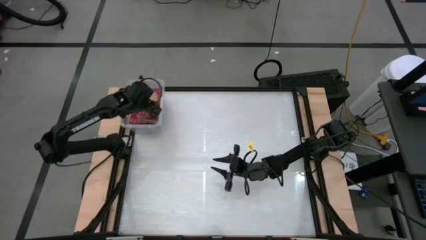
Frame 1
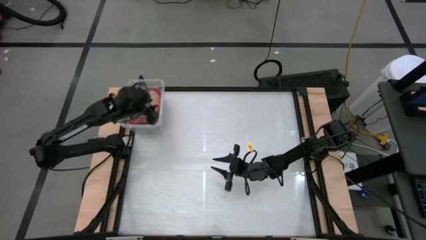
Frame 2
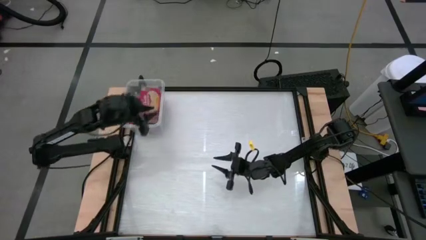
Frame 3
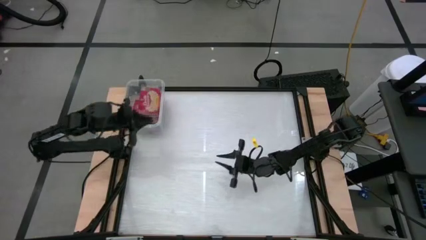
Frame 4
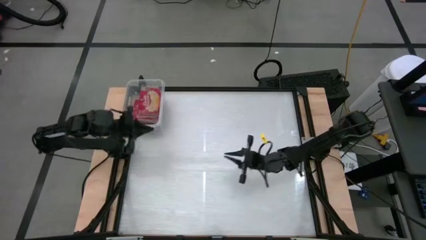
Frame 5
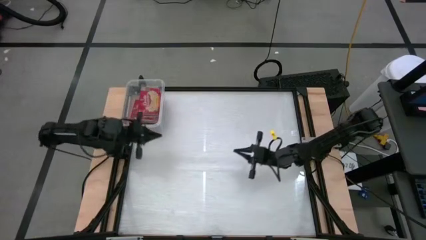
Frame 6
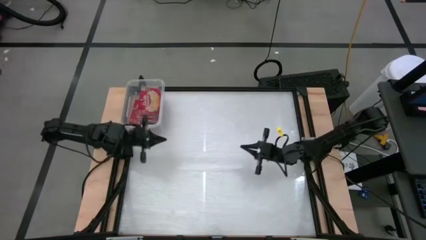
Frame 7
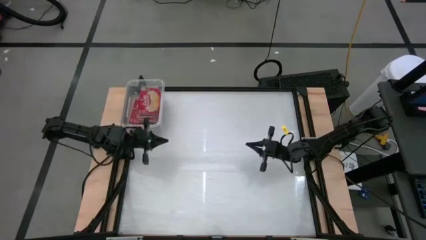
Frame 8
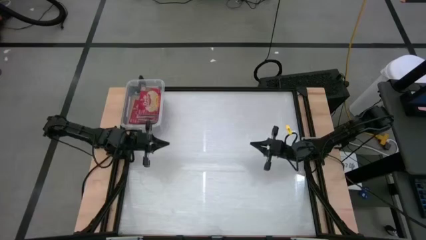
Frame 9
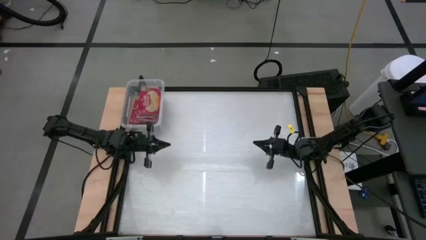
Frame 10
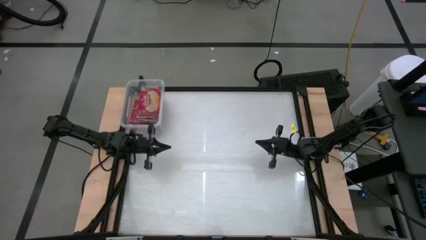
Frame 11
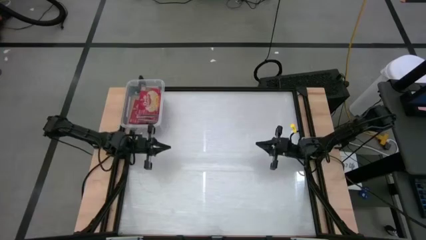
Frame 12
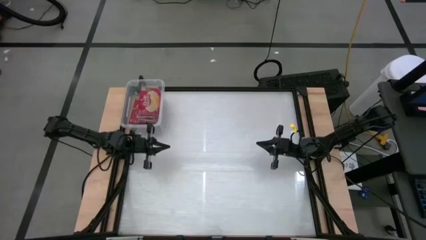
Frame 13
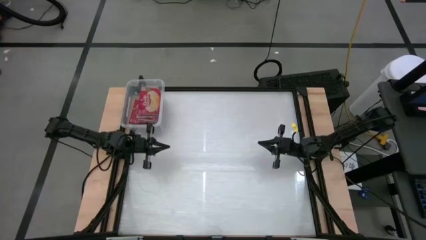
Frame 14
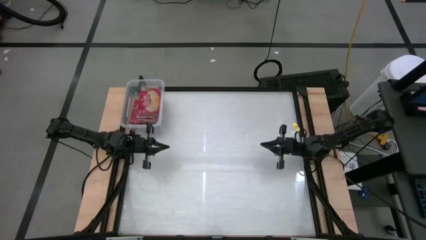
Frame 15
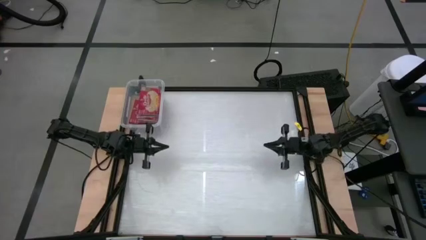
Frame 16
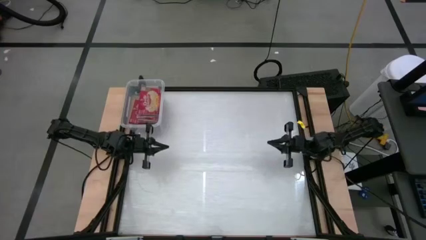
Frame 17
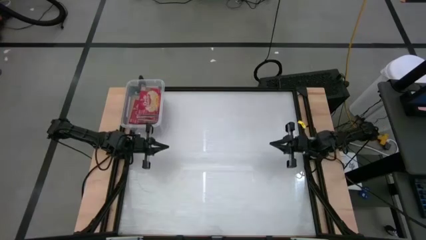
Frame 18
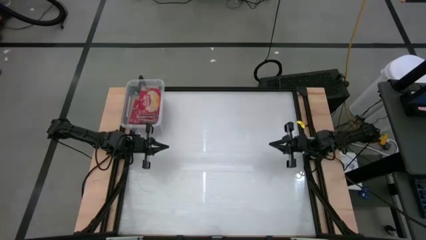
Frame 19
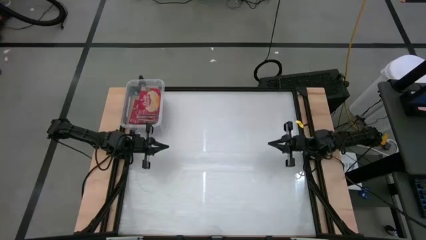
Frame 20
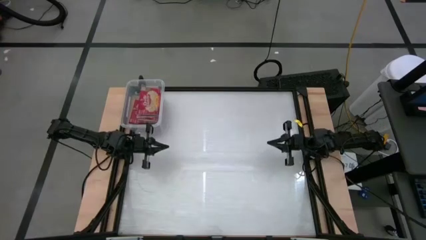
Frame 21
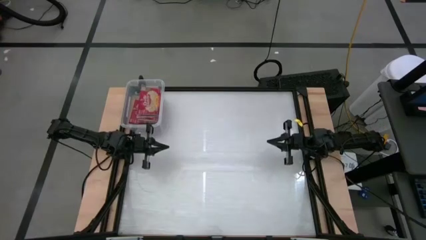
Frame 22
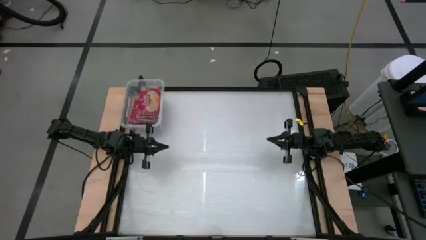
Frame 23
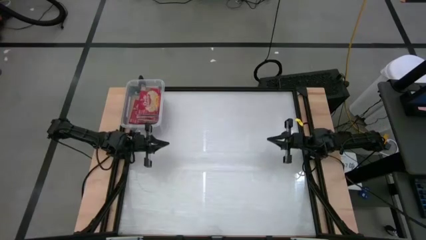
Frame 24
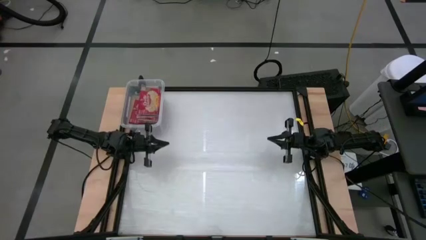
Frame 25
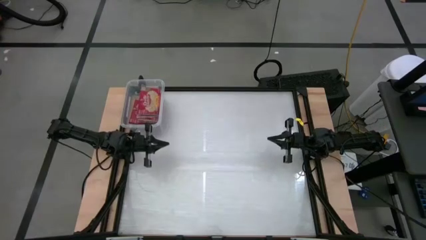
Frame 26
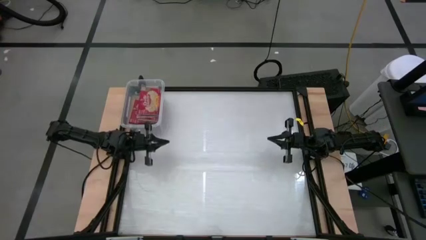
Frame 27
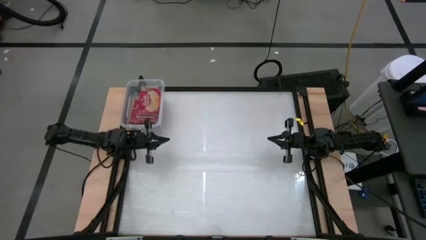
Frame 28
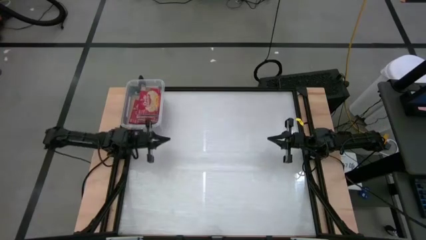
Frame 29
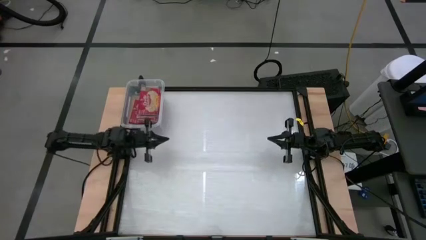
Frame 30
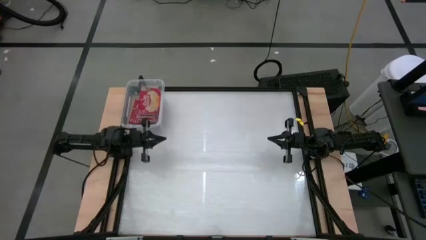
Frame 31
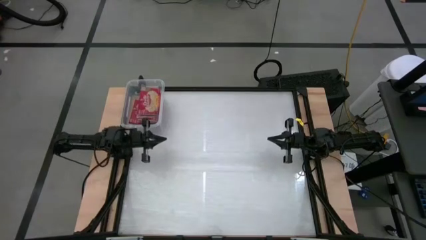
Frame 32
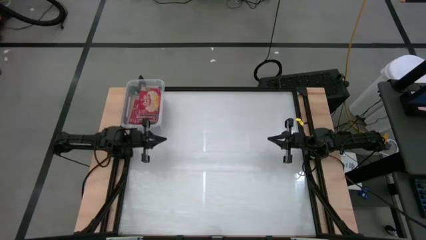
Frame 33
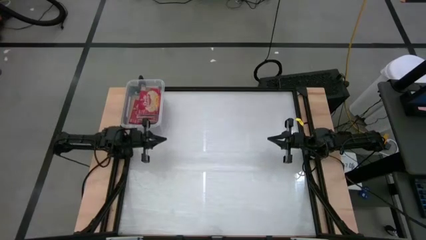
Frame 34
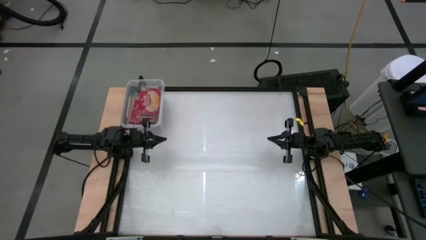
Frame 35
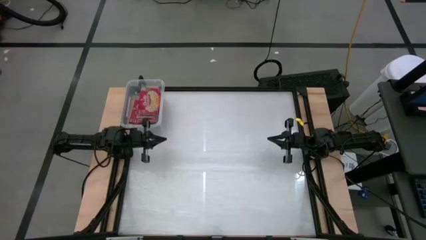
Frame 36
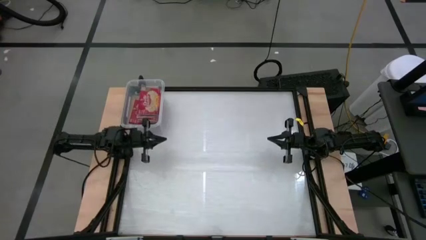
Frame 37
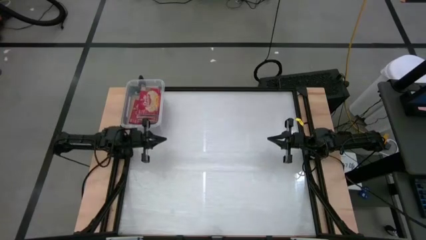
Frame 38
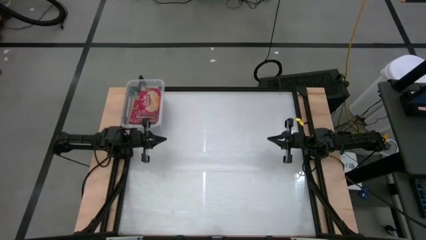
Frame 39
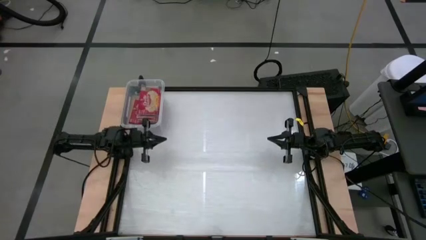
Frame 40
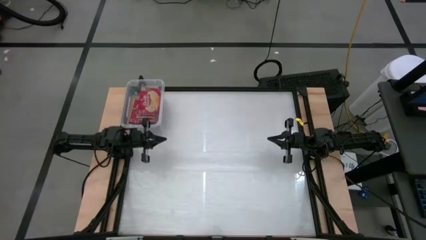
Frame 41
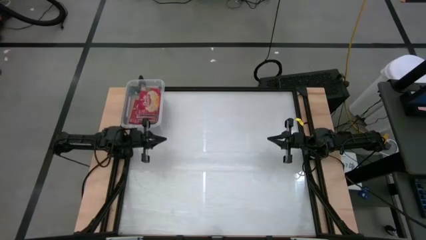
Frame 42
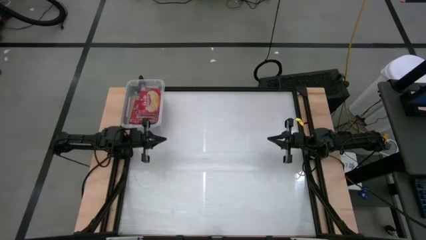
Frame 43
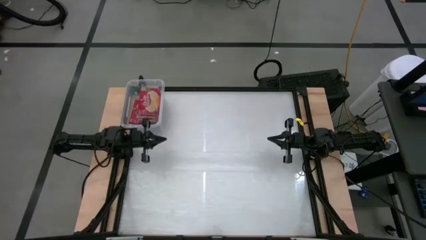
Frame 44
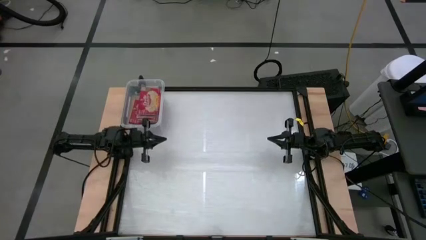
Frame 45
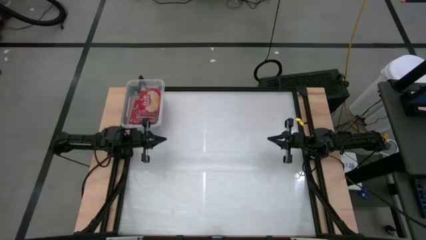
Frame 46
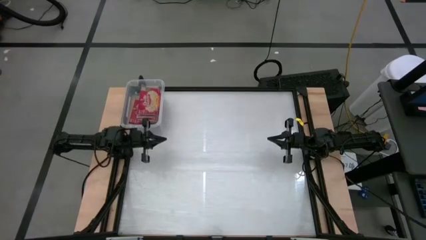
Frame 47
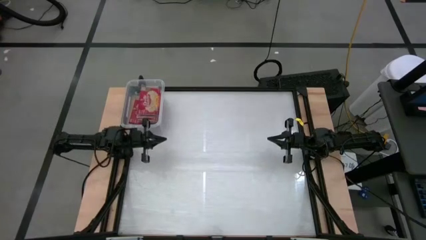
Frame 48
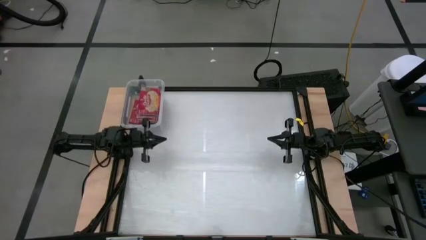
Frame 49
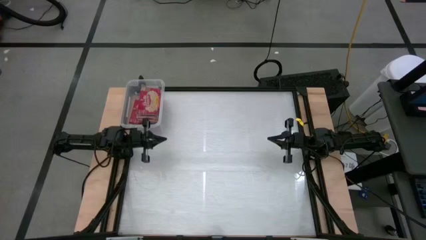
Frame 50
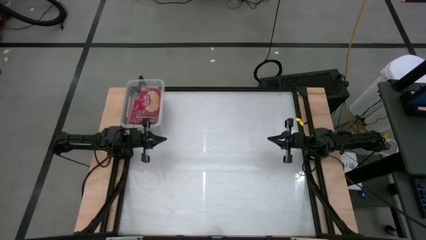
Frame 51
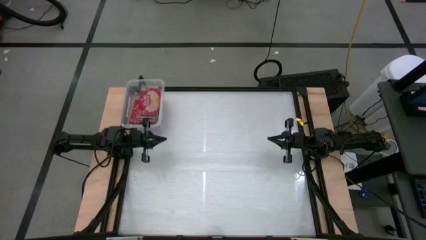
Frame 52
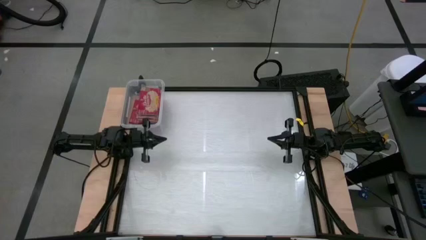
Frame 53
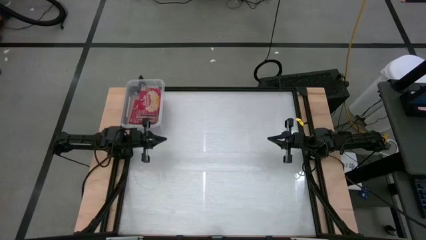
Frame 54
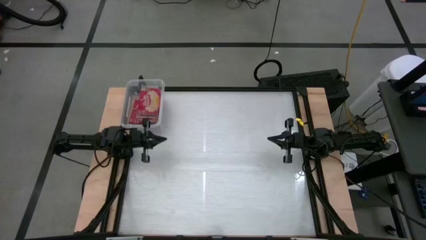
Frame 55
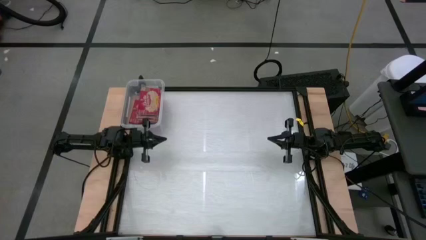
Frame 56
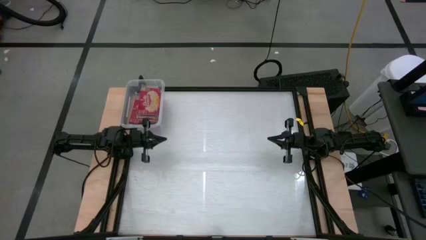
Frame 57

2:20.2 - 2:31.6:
Task: Sort popcorn bags into baskets
Return to Home Position

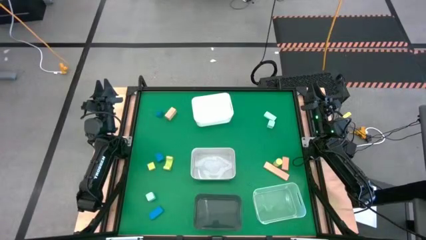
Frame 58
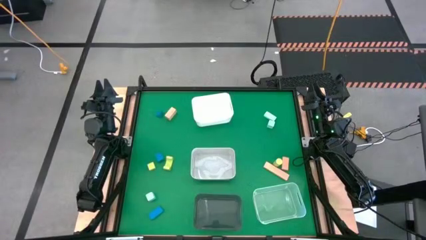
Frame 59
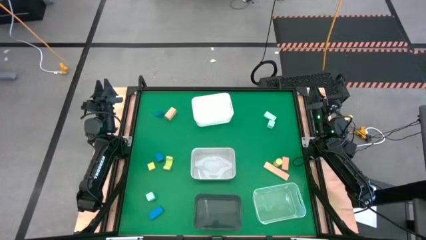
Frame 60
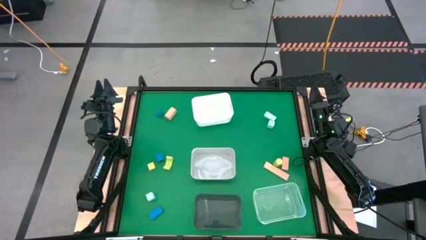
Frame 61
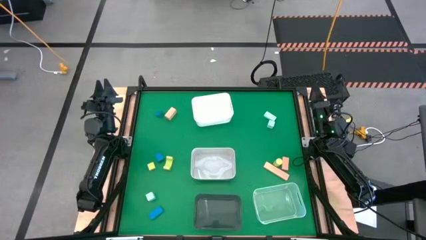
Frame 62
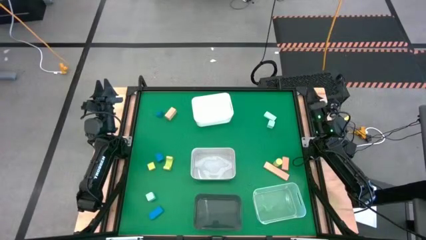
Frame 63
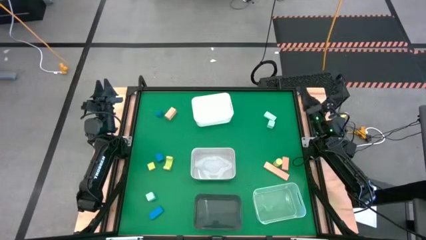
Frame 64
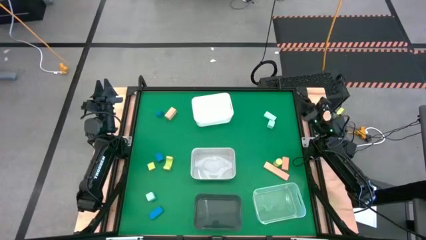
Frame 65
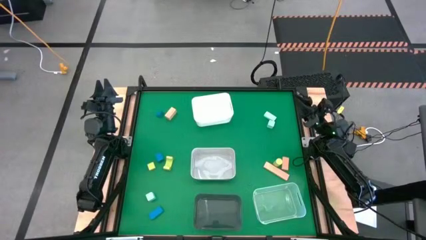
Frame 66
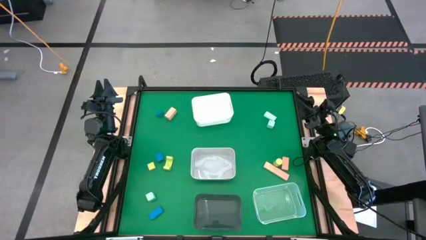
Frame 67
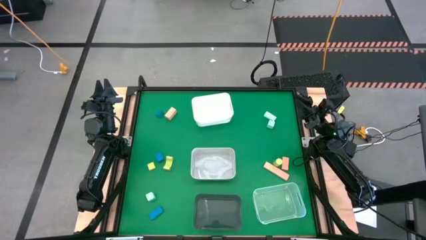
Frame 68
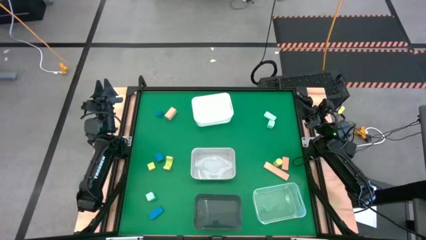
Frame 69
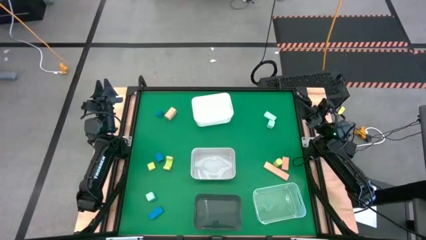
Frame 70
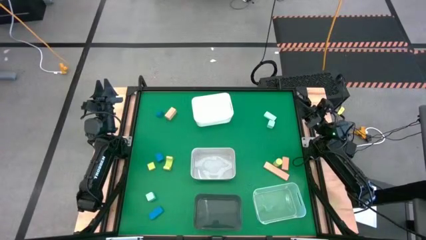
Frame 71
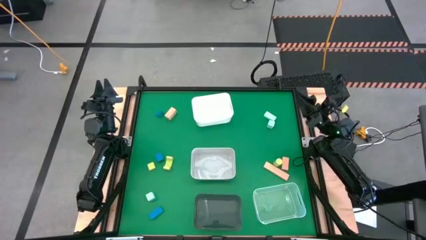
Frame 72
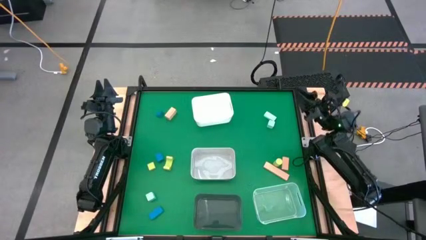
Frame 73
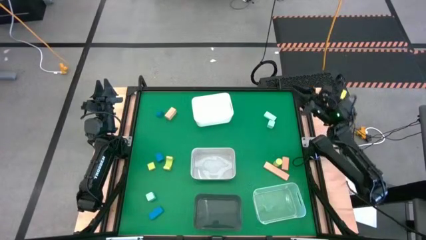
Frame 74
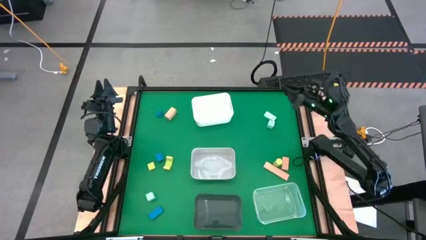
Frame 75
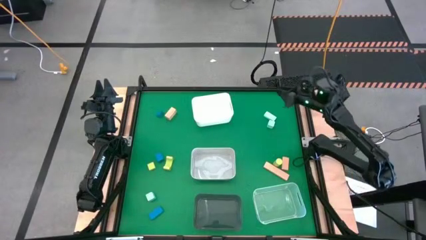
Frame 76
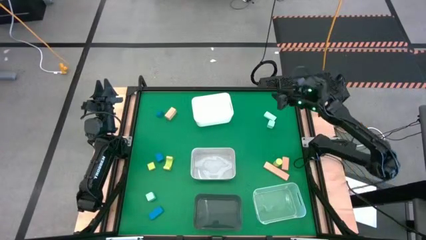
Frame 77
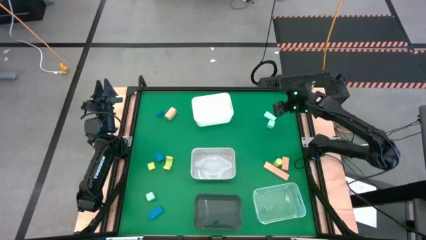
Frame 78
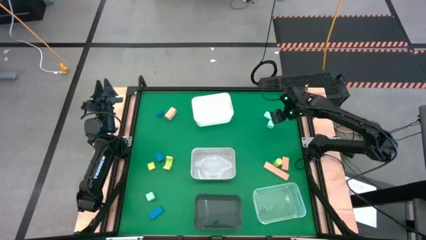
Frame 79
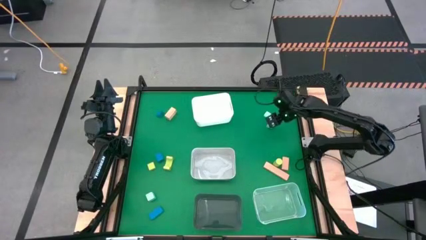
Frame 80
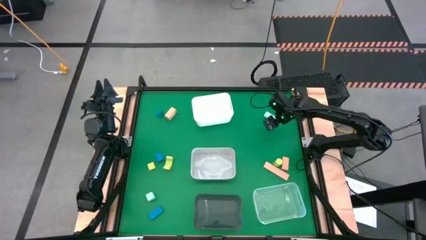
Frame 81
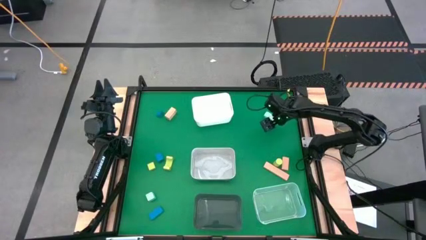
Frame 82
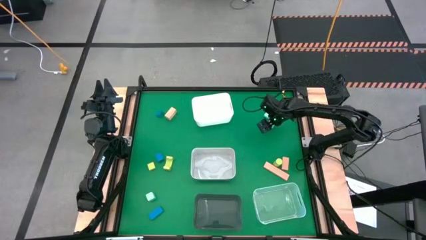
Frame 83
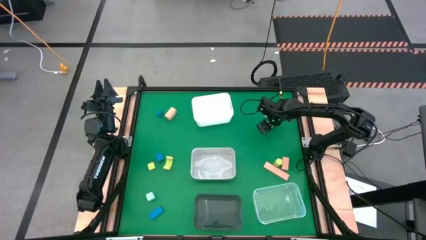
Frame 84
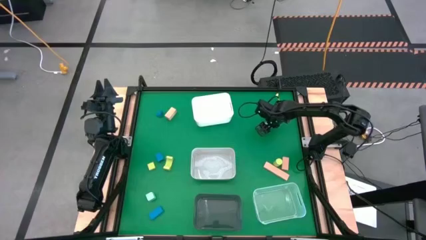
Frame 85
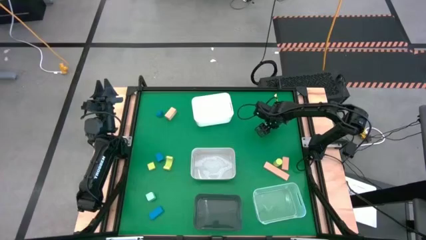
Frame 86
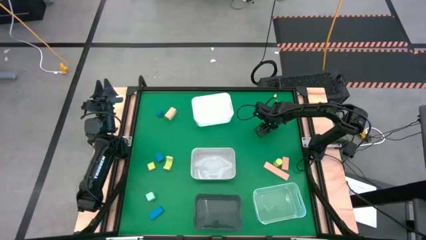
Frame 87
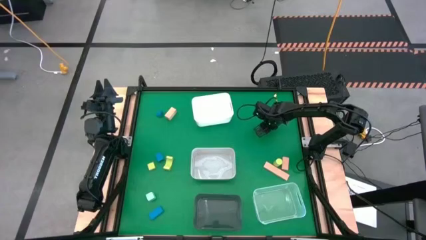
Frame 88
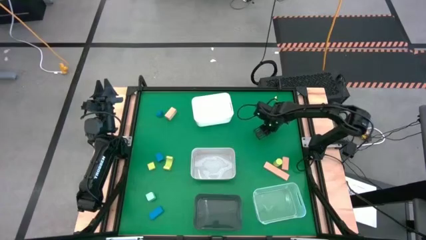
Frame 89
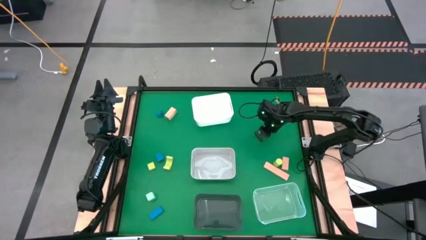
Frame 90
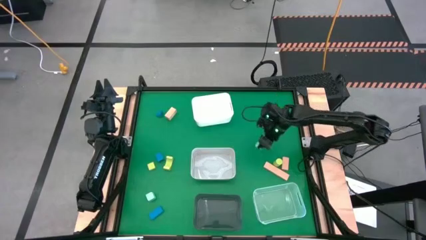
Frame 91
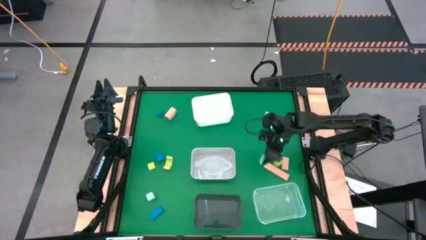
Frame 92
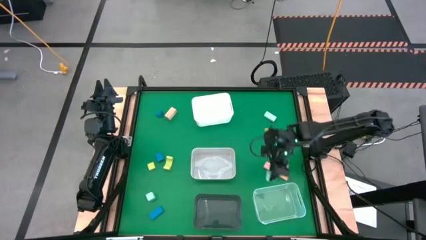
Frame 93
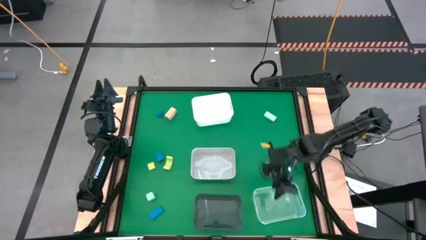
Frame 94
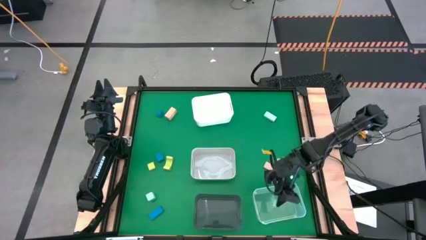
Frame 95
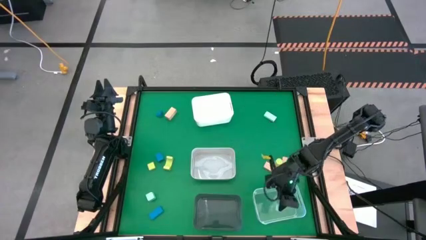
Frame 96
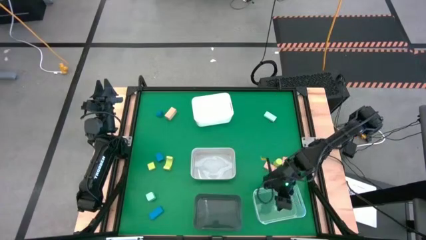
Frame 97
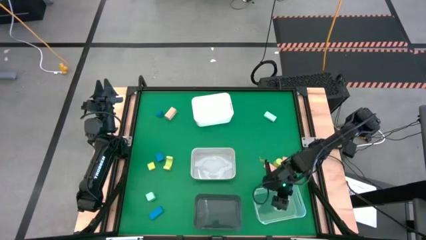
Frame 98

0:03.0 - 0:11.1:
Task: Sort & place blocks by color
Put the bottom right light blue block into the transparent bin
